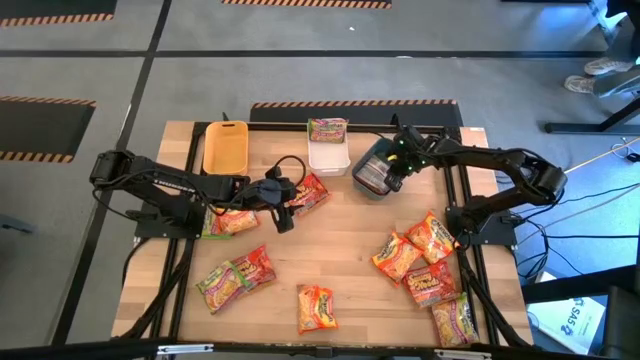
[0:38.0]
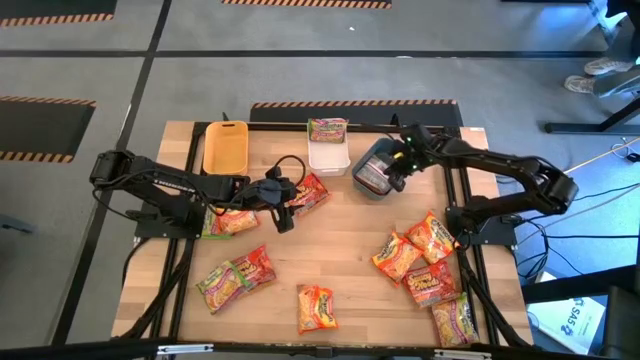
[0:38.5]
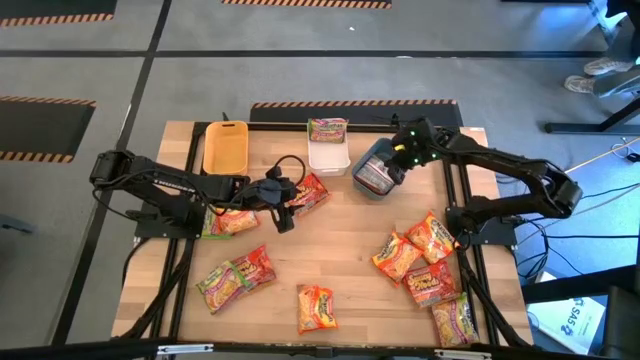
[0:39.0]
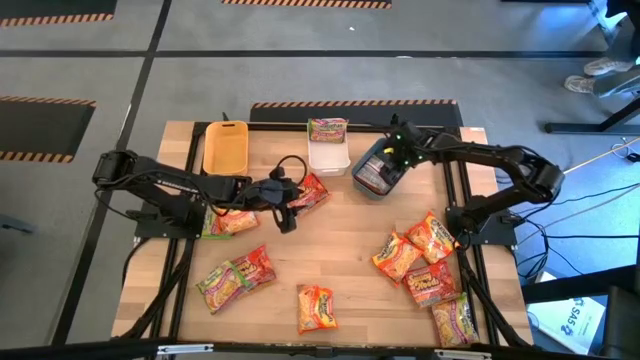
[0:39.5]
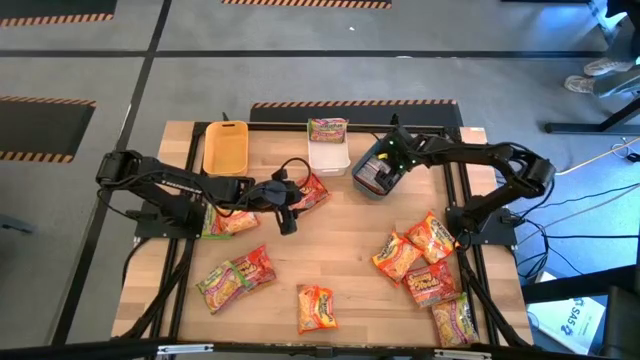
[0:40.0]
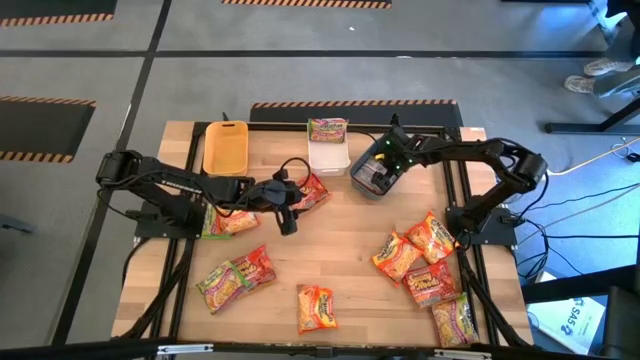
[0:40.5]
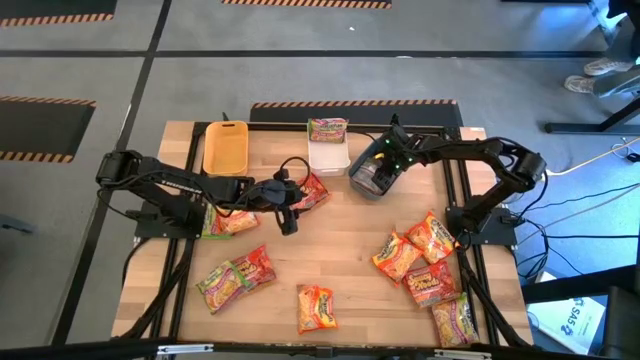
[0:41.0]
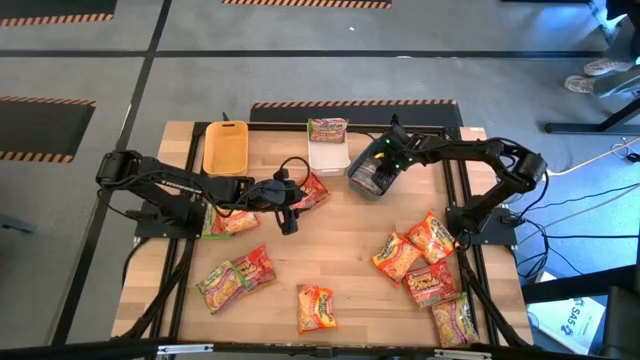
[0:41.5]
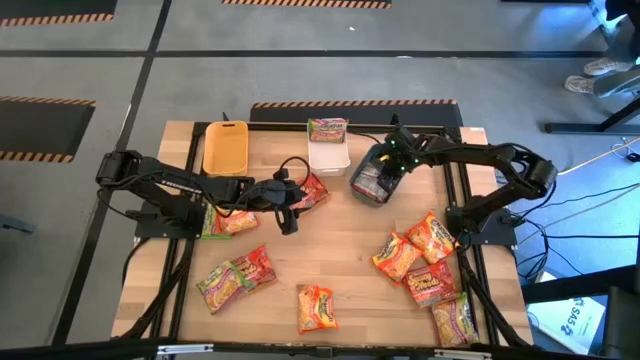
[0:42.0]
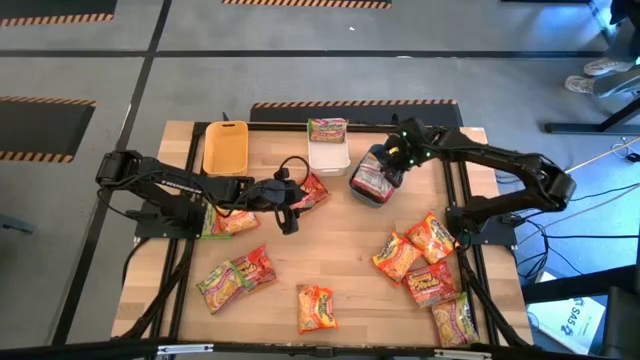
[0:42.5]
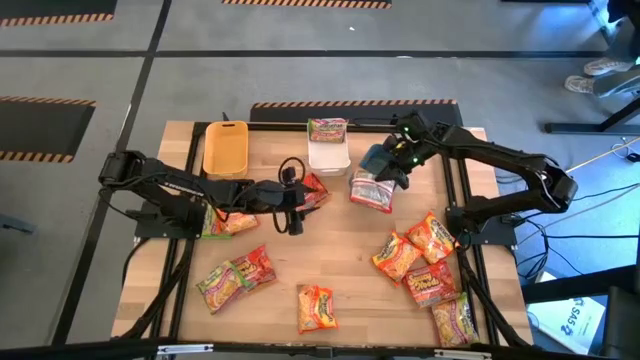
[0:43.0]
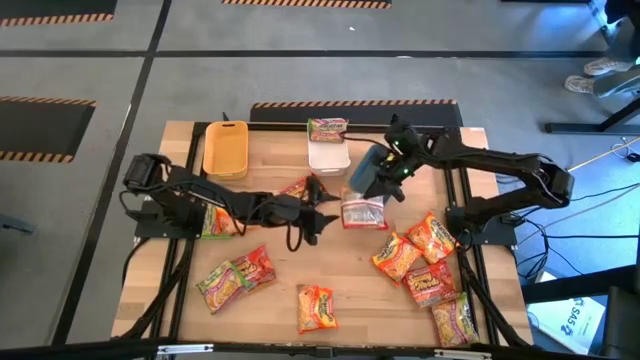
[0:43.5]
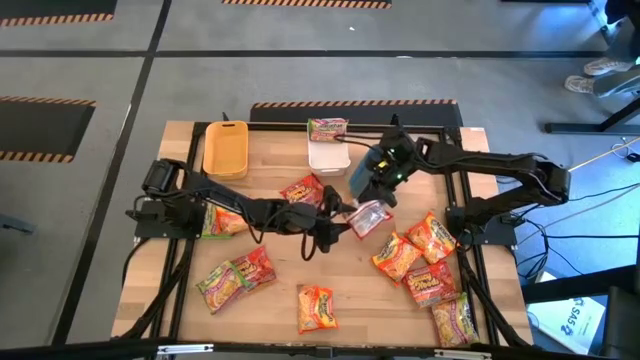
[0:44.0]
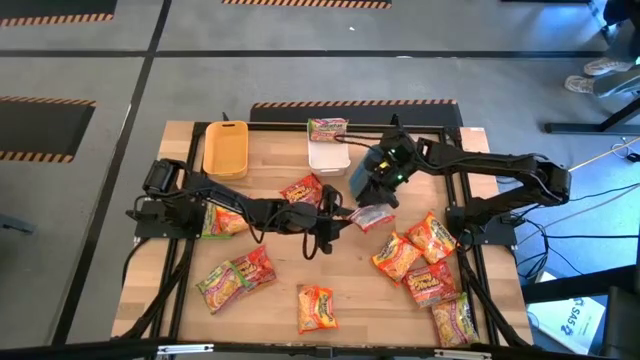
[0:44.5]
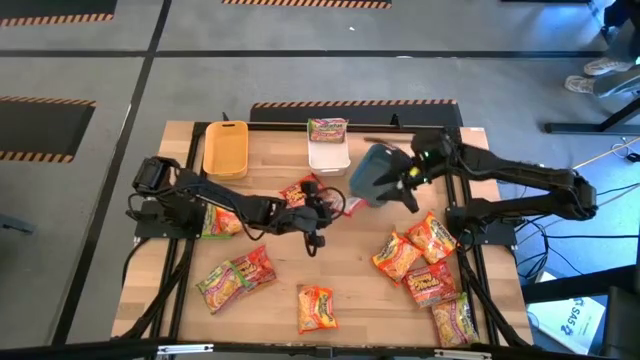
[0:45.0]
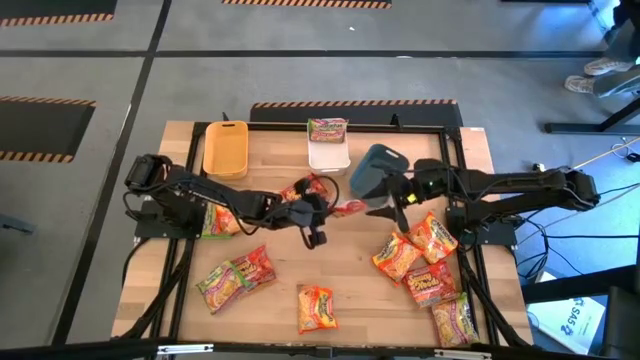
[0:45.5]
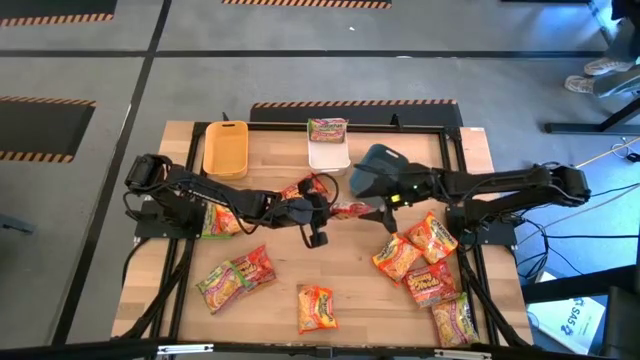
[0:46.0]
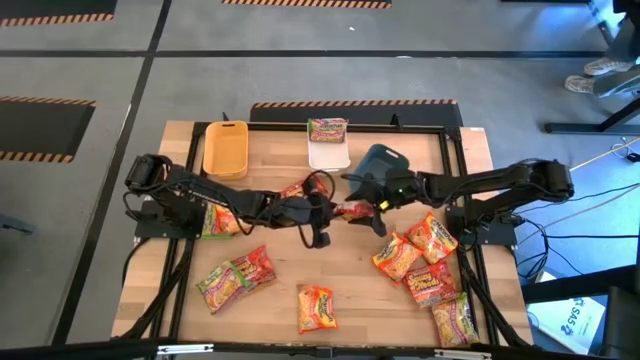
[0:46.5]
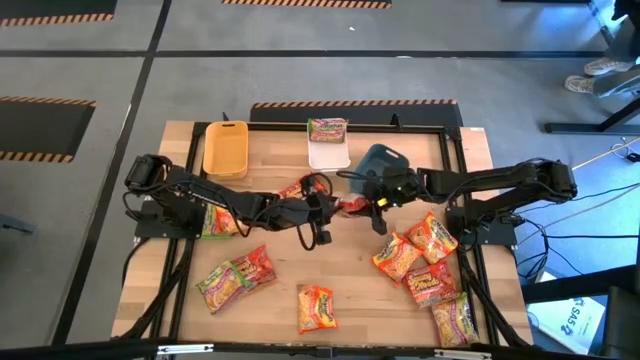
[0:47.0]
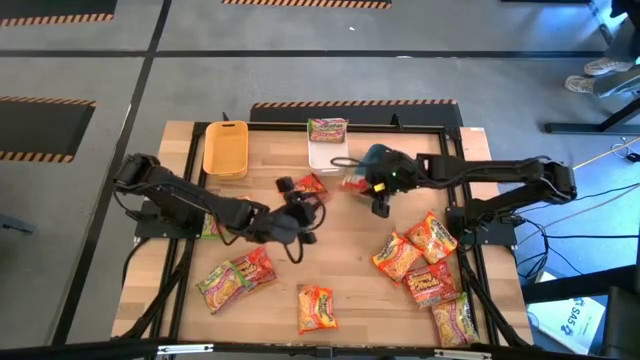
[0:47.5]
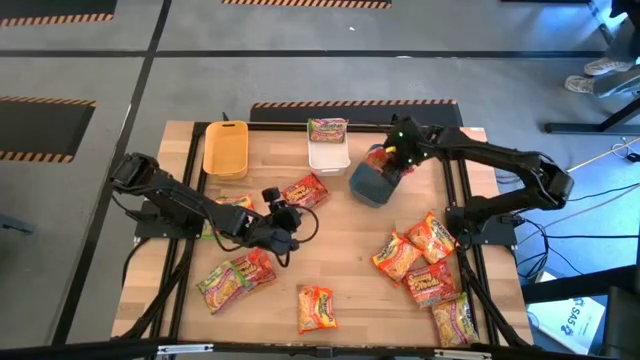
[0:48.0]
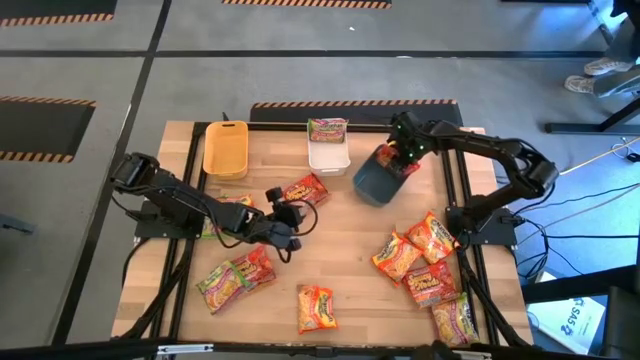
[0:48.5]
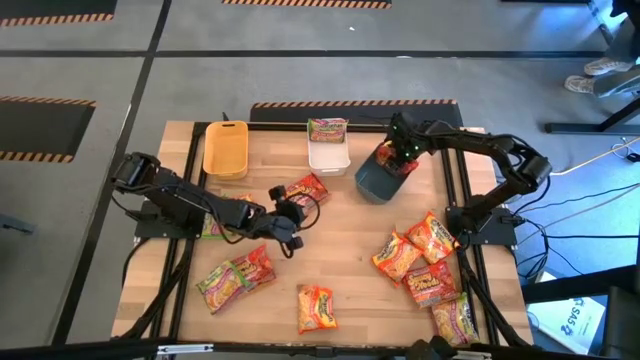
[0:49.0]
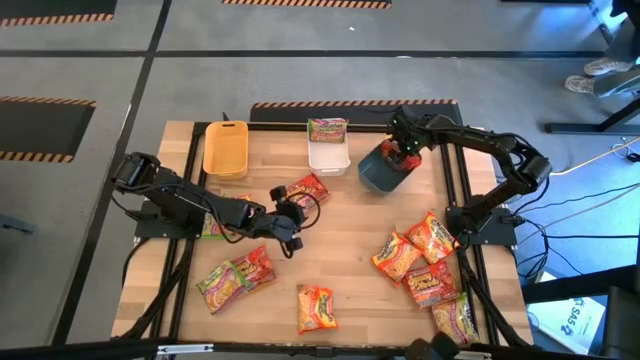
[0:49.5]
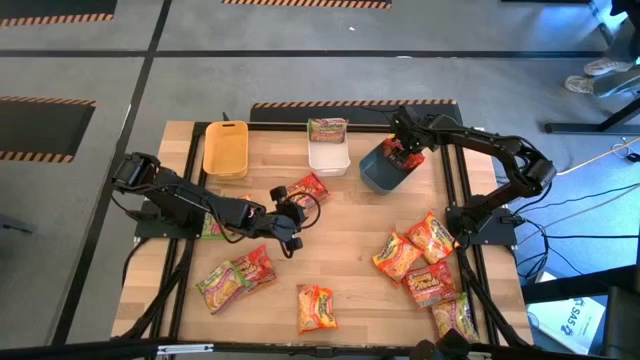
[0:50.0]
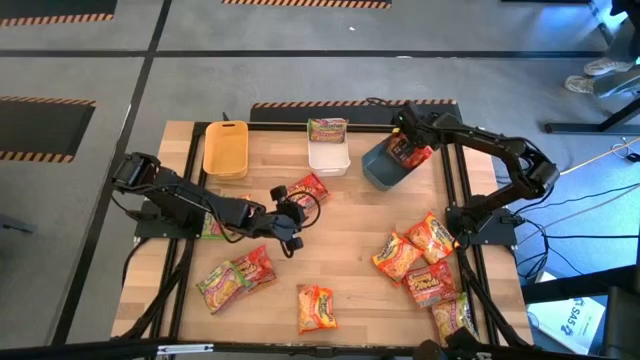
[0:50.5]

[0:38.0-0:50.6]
Task: Sort Maruchan noodles
Put the red noodle pack into the blue bin

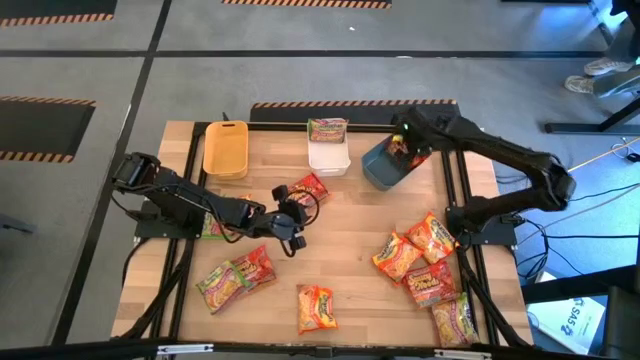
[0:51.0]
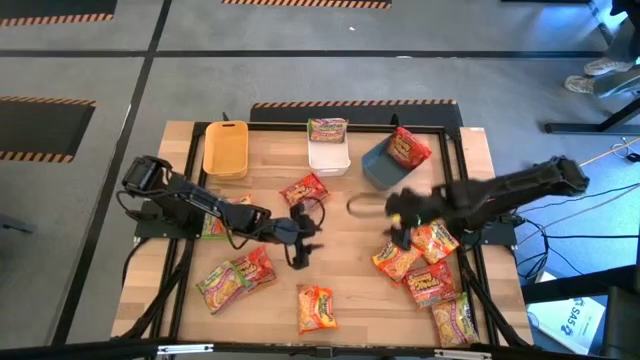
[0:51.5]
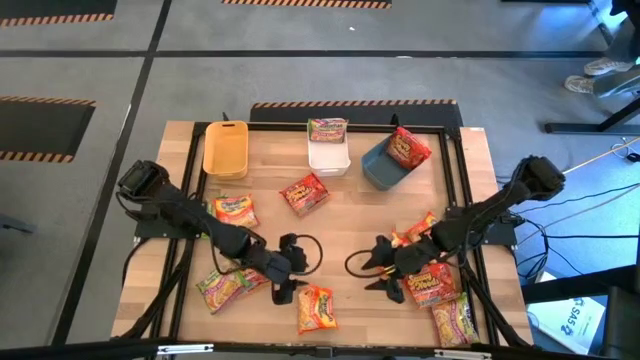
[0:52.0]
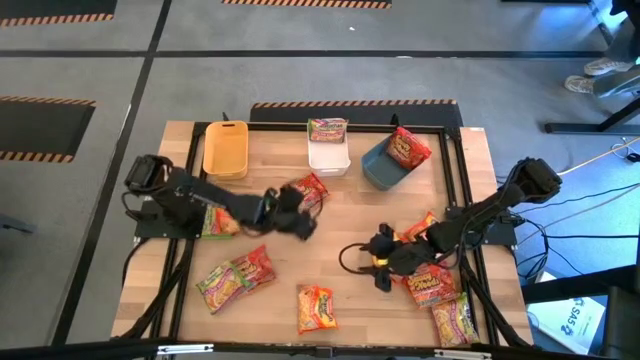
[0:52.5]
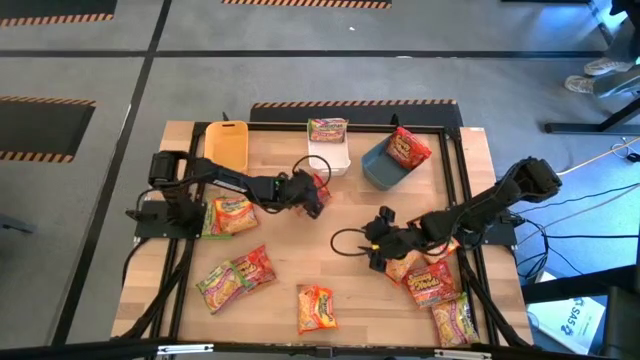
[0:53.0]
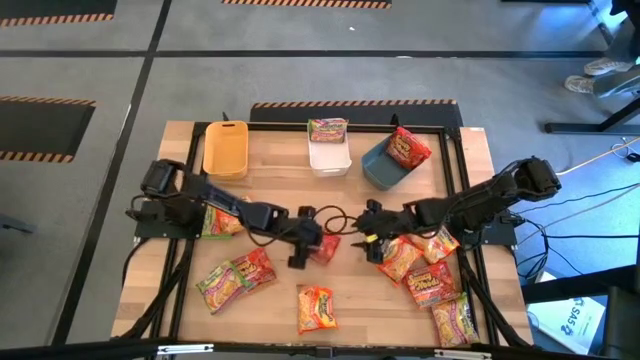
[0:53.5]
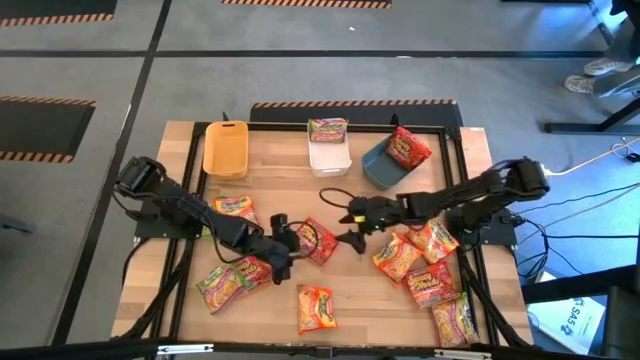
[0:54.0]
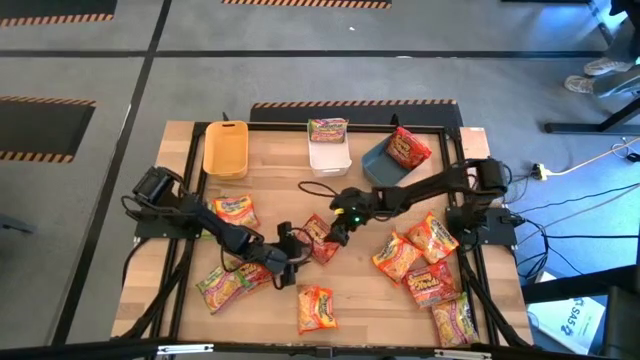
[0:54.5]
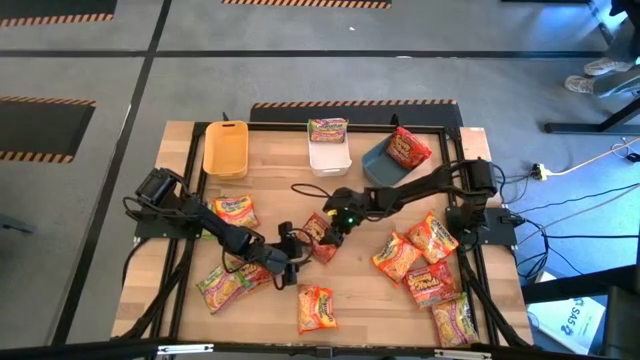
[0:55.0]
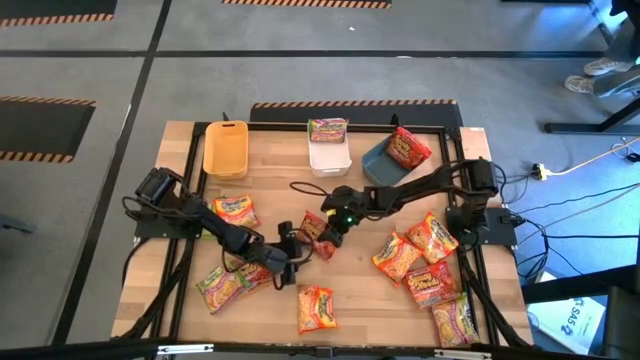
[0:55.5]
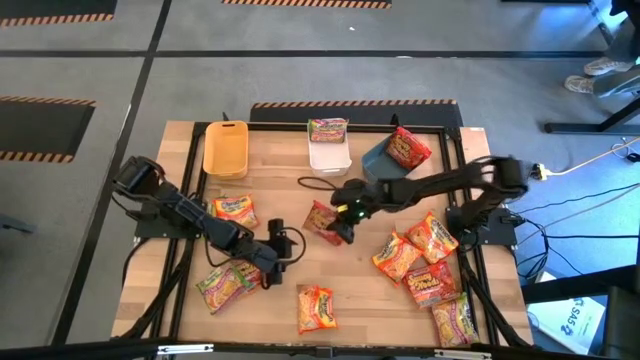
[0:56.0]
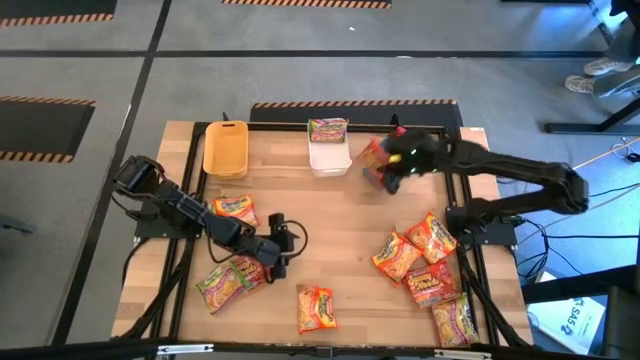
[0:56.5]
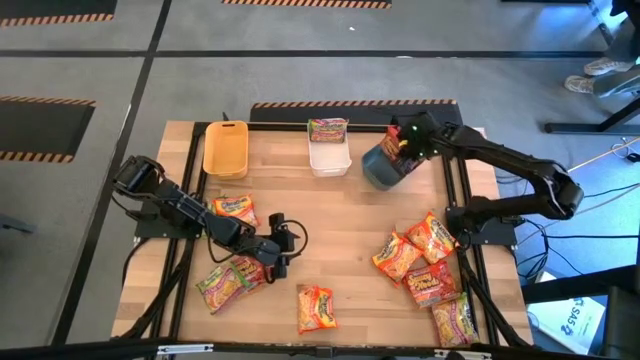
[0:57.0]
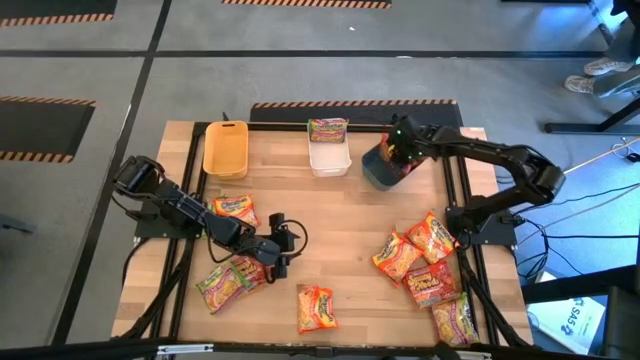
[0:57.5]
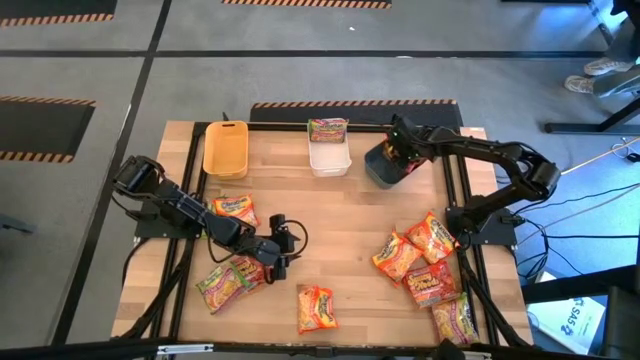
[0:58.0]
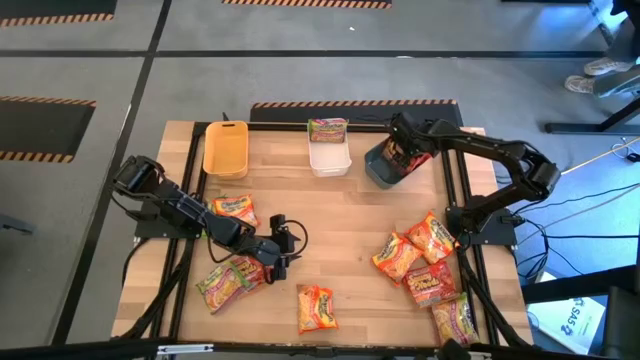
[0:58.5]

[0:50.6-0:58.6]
Put the red noodle pack into the blue bin
